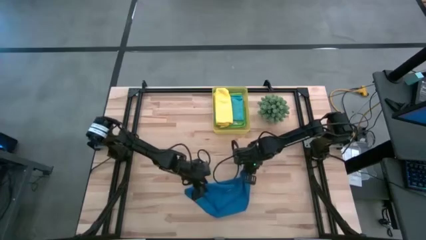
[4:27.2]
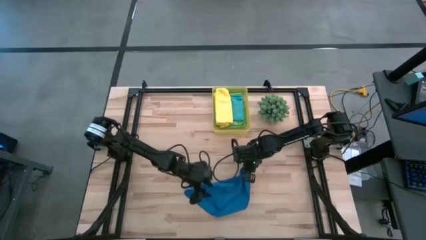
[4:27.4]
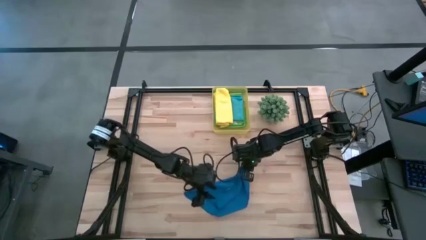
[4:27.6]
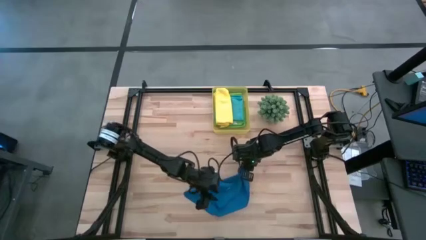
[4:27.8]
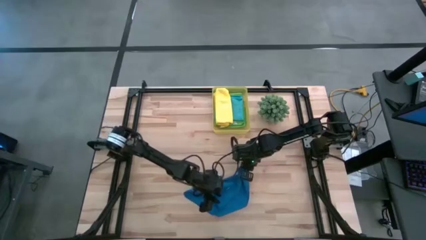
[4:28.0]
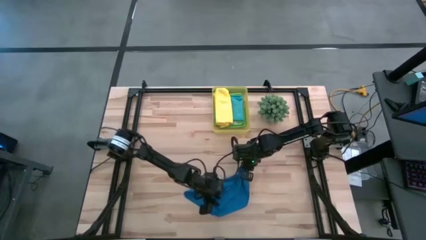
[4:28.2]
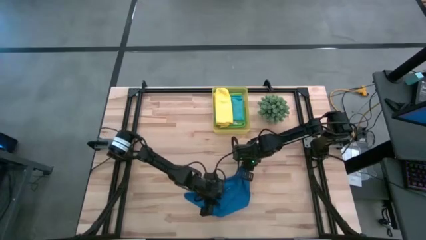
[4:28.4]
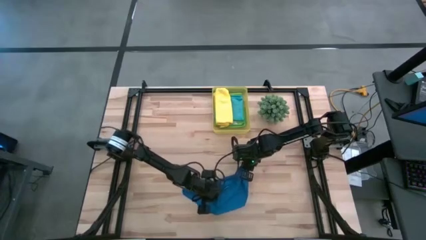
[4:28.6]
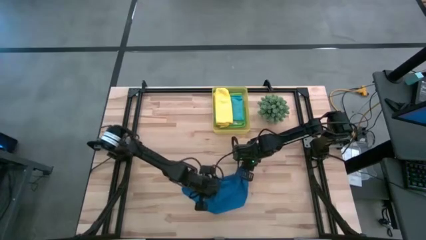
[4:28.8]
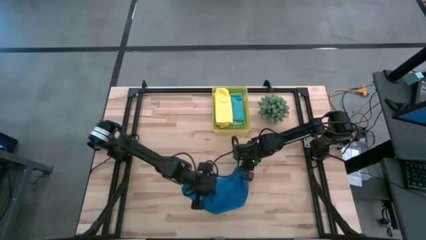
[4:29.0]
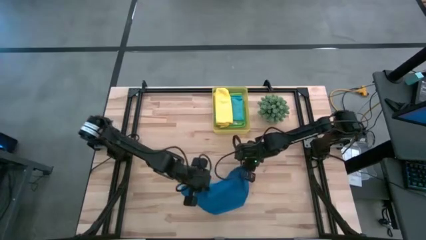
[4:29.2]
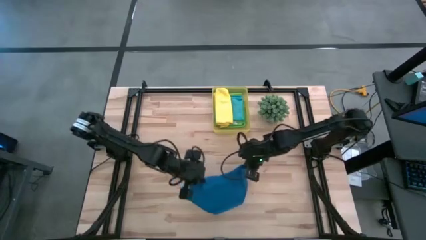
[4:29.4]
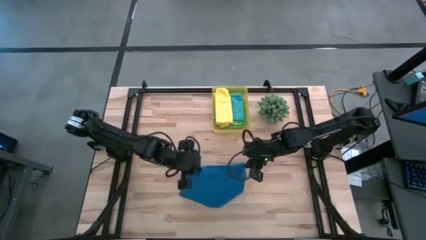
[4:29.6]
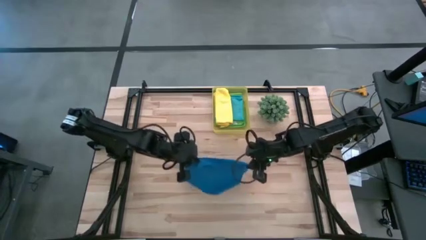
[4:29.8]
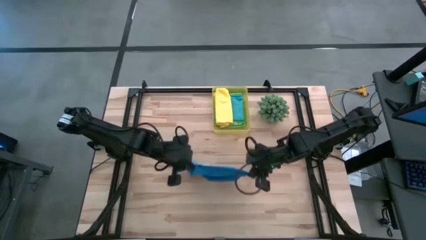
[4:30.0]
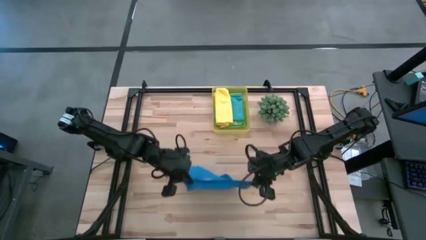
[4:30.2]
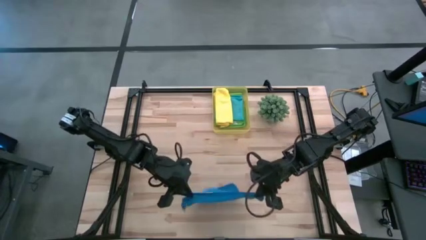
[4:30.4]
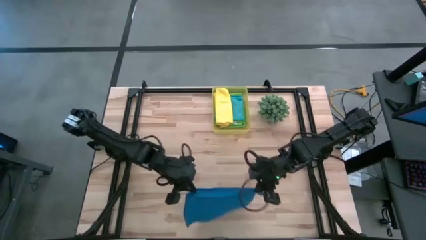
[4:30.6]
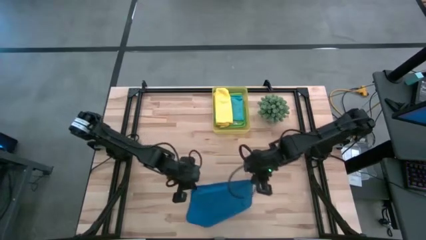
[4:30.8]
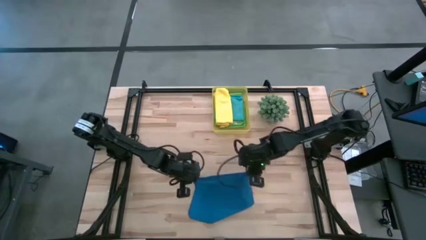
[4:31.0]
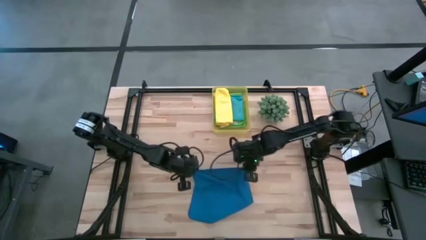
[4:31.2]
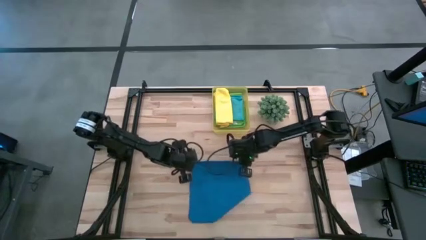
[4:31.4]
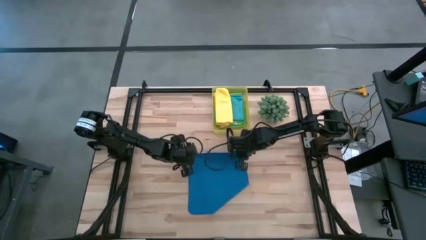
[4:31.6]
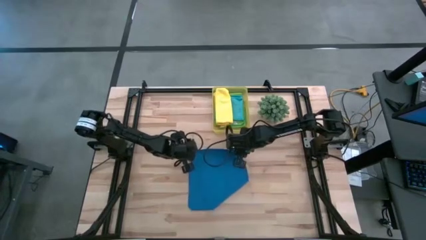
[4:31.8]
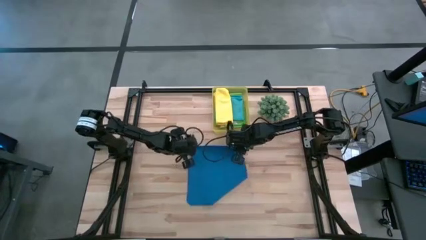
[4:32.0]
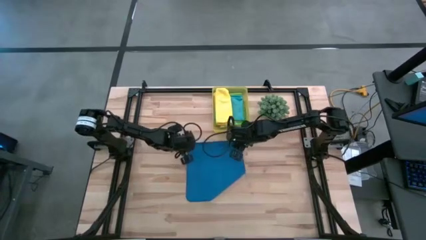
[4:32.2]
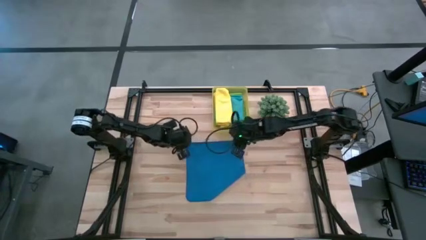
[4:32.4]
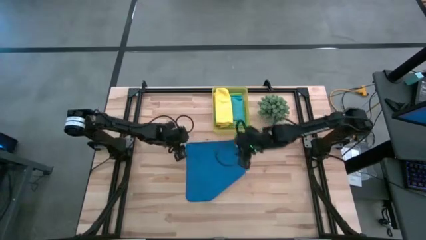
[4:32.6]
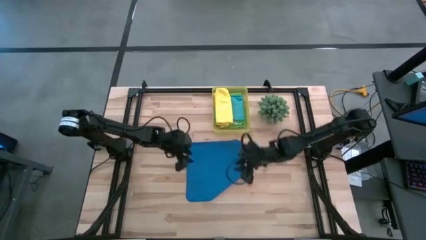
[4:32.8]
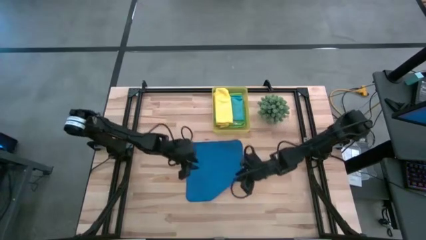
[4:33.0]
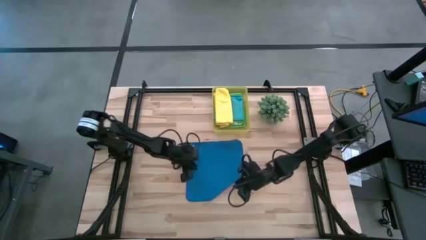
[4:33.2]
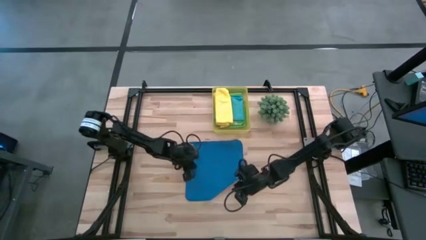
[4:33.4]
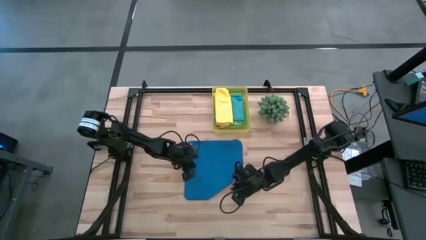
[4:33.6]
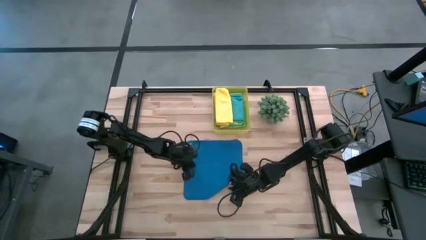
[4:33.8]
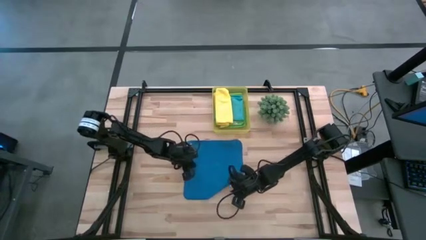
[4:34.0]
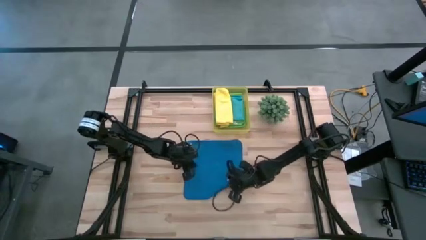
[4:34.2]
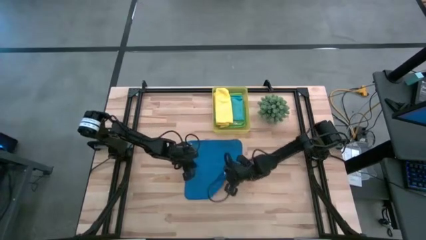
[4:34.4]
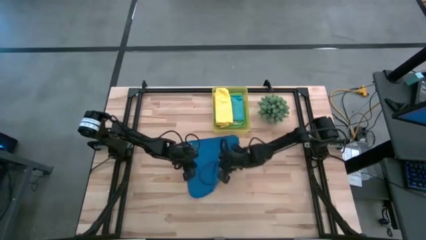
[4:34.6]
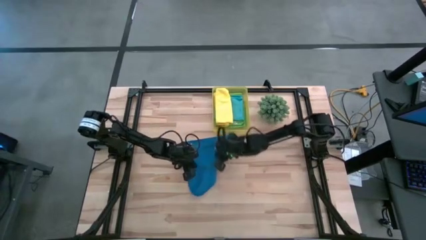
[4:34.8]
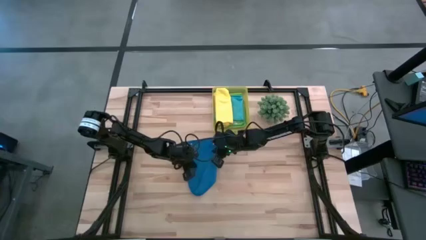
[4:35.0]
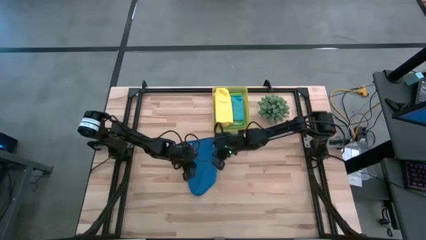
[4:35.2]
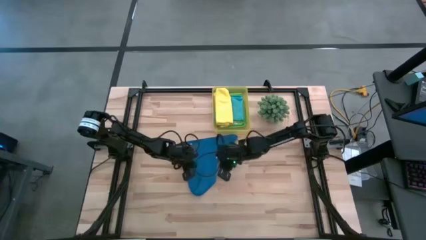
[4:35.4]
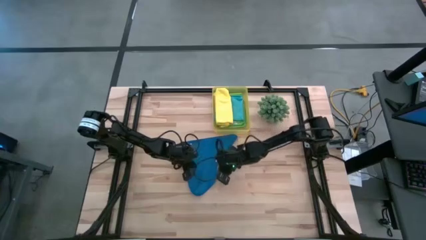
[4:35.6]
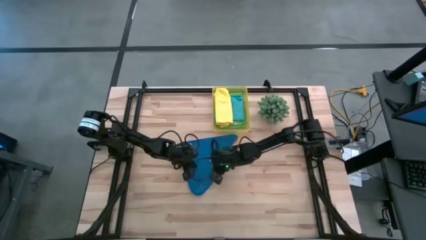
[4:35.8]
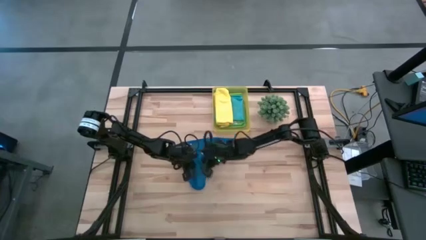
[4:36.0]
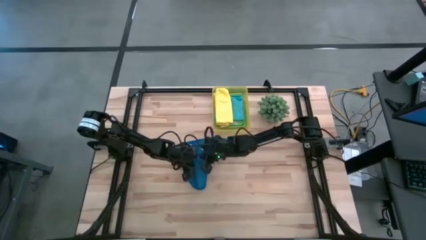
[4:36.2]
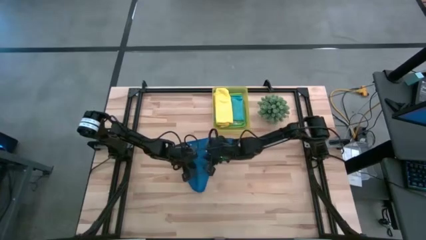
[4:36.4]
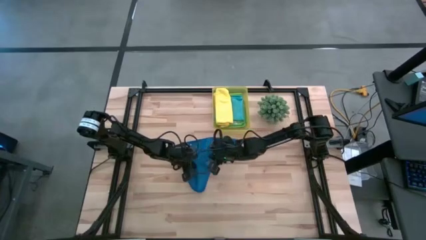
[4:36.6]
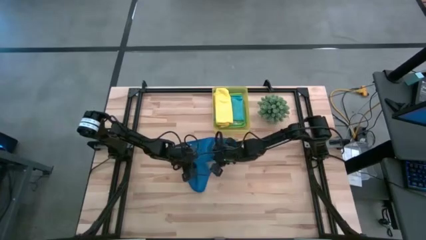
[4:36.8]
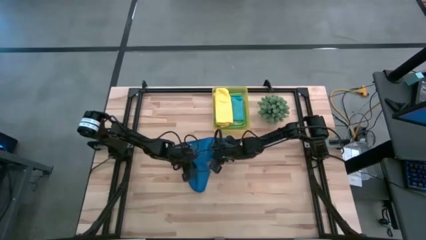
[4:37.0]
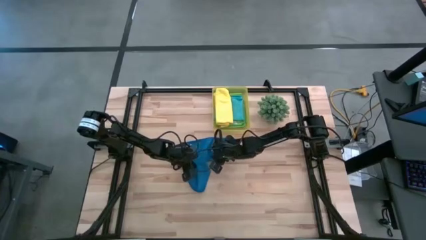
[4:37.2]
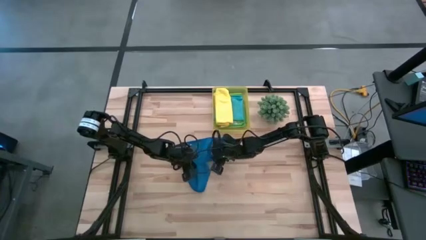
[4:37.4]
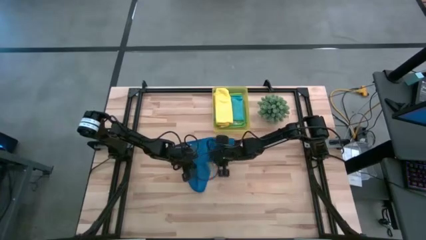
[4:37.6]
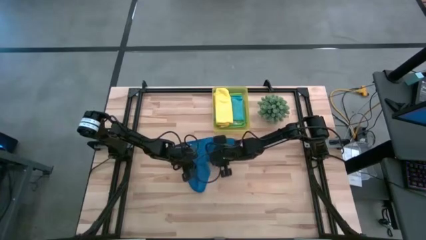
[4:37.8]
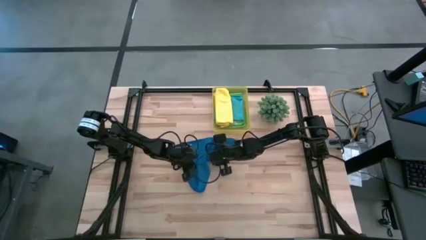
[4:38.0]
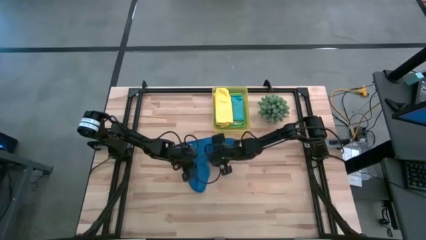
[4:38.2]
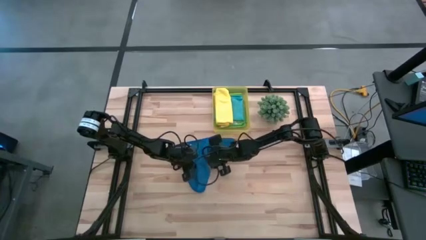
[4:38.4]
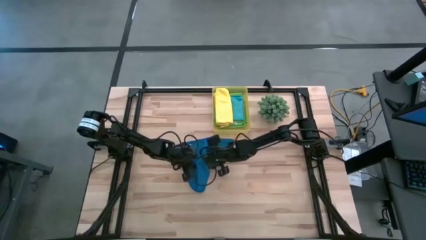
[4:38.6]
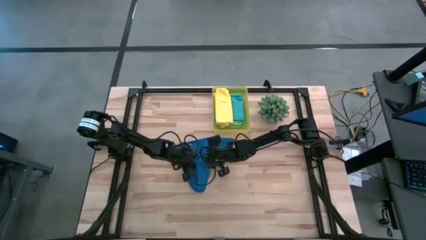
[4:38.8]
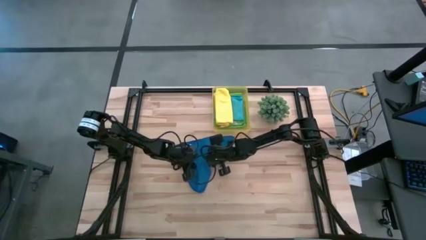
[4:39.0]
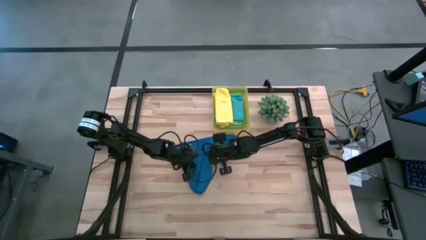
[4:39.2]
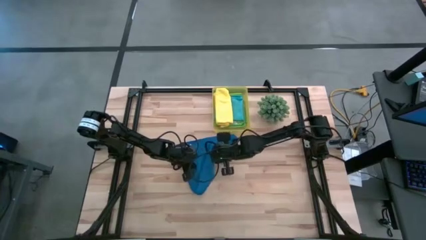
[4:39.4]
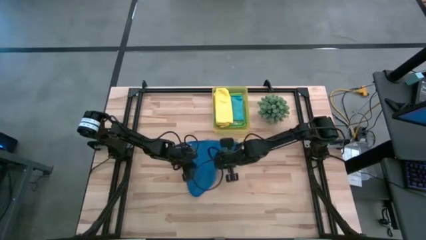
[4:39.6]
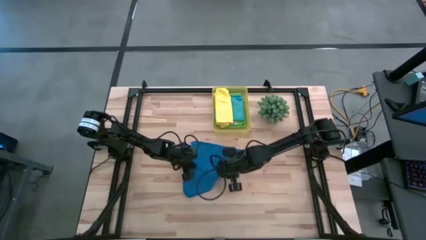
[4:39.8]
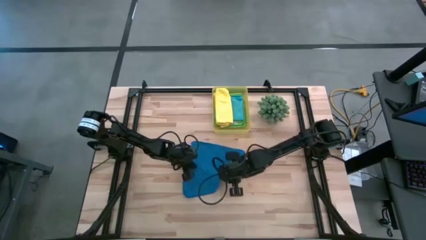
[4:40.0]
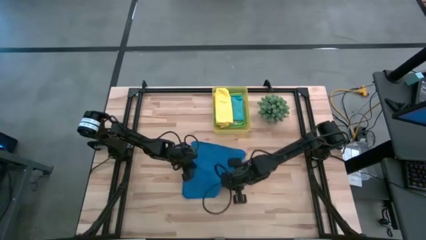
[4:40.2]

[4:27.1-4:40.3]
Task: Fold microfiber towels
Fold the blue microfiber cloth

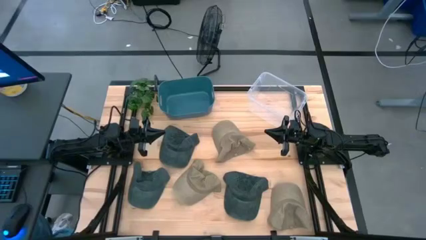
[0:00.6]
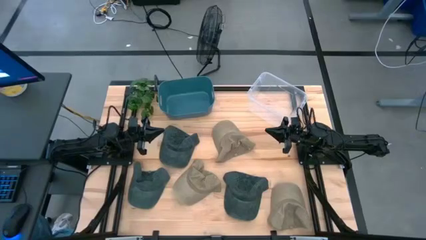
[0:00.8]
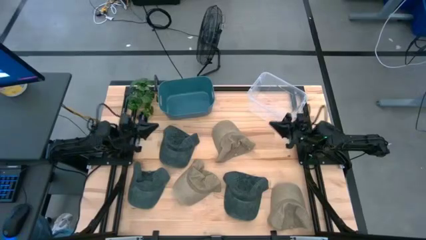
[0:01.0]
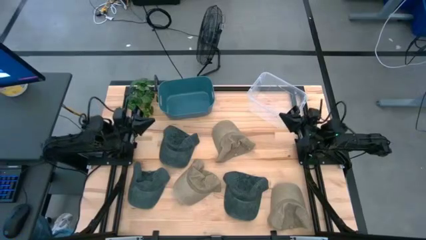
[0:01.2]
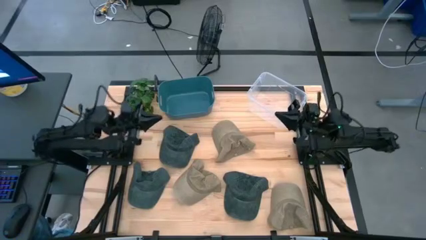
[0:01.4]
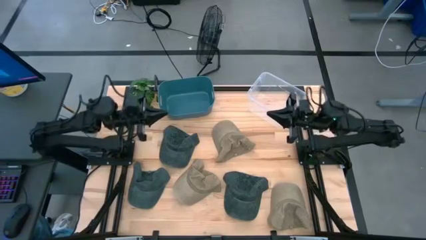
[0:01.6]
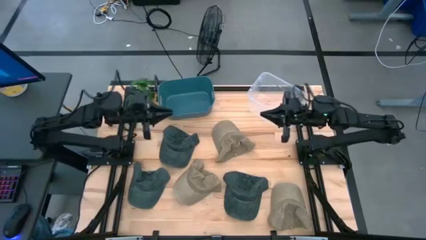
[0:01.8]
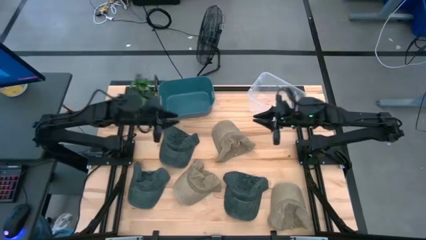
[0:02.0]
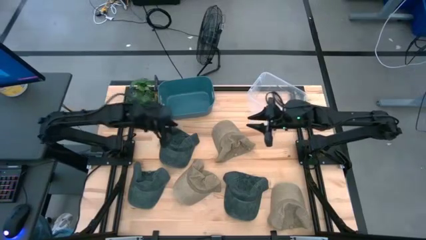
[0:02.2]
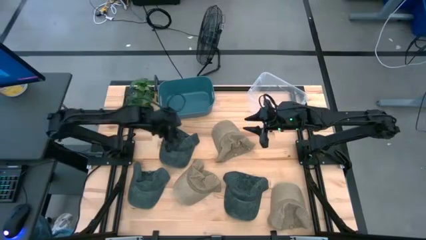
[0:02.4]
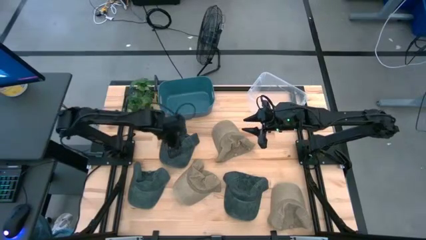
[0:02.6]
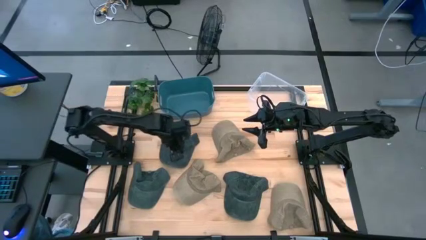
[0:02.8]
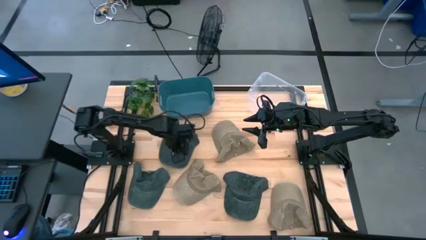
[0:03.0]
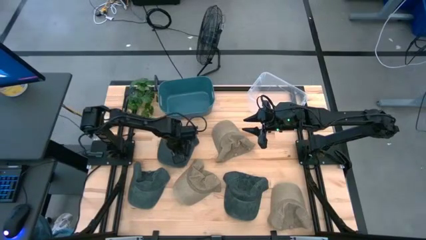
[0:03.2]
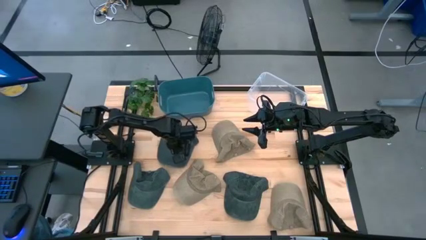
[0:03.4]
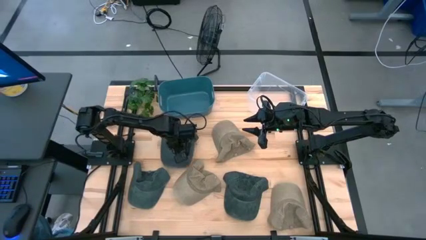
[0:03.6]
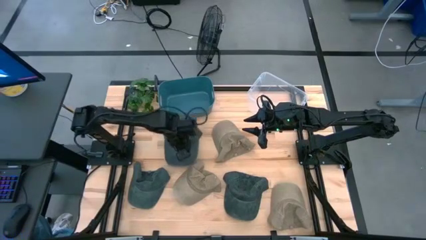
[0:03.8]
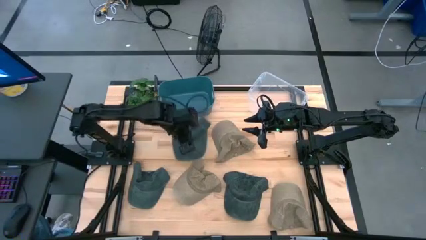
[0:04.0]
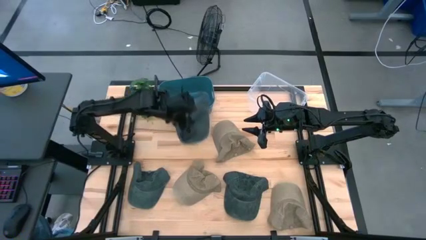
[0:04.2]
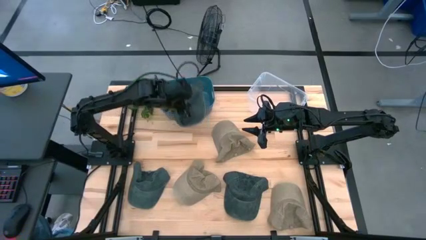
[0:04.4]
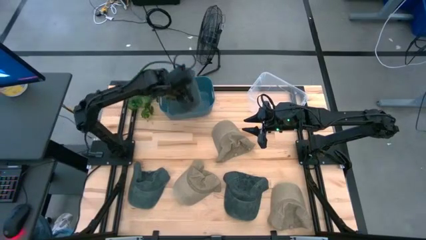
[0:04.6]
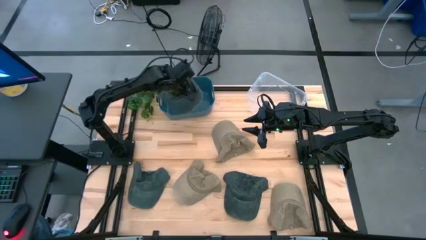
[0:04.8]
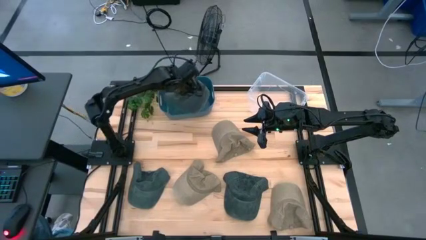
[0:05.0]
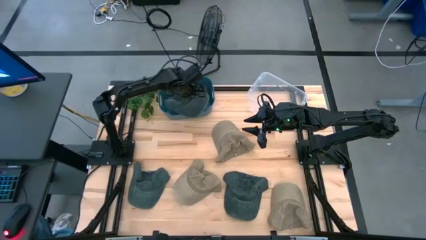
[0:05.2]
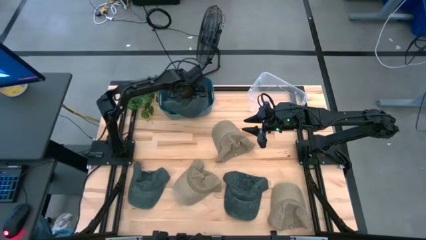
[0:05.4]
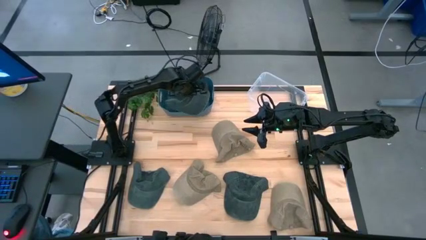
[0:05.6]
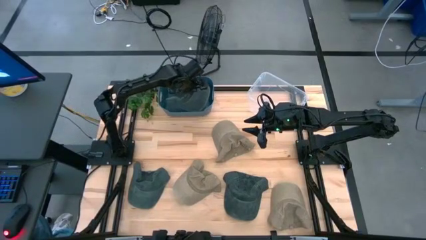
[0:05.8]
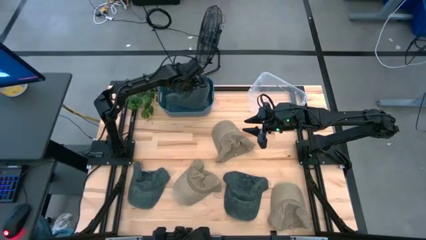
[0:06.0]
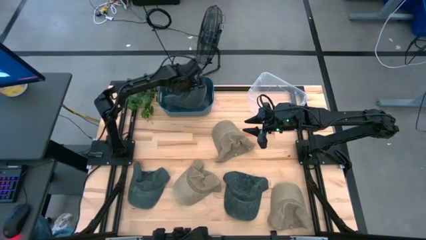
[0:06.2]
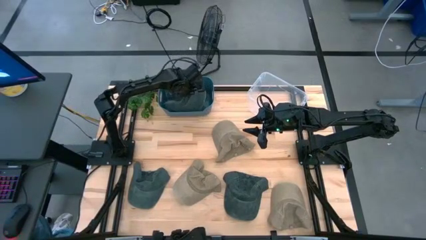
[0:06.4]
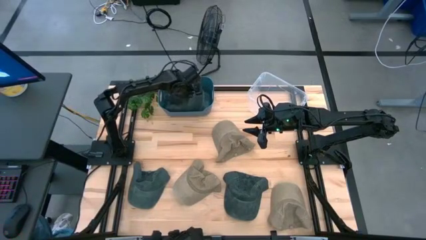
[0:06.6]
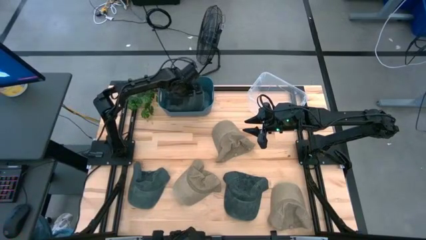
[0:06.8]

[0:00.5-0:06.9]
Task: Pick & Place hat
Put the top left blue cap into the blue bin
